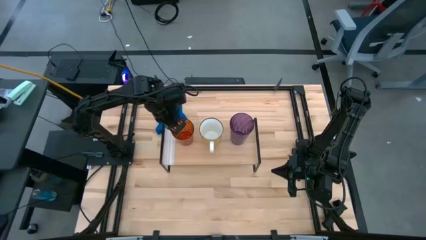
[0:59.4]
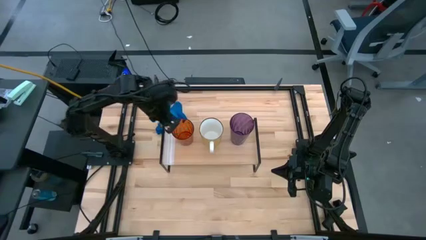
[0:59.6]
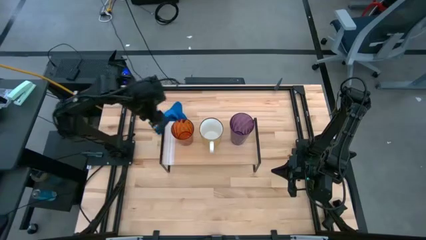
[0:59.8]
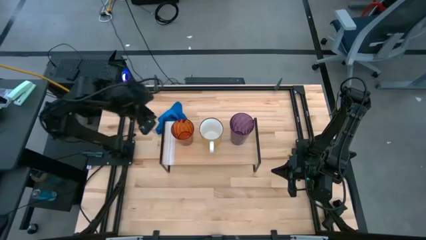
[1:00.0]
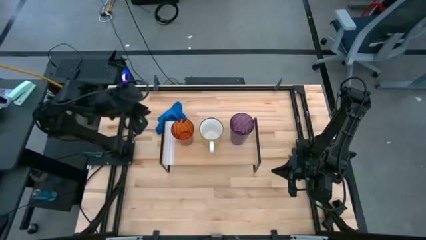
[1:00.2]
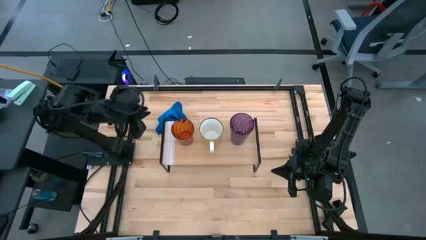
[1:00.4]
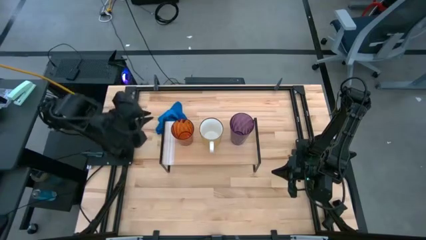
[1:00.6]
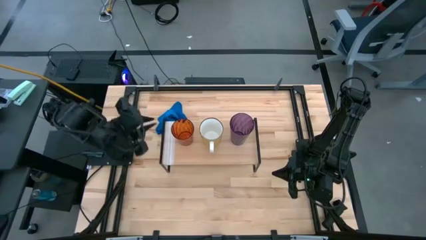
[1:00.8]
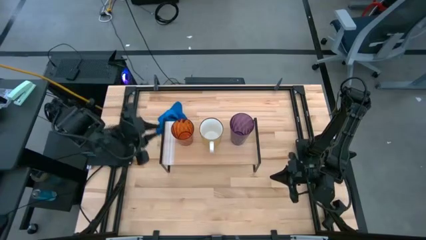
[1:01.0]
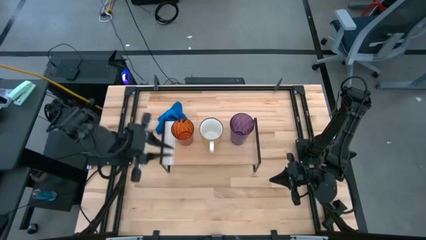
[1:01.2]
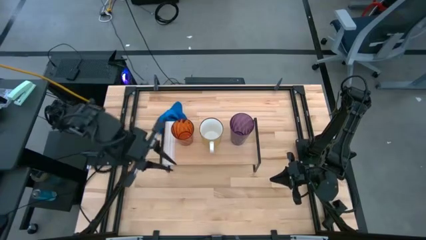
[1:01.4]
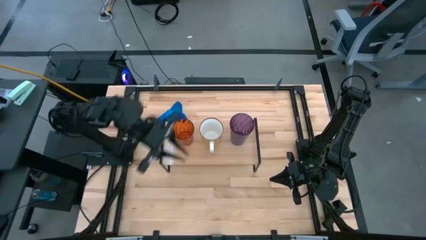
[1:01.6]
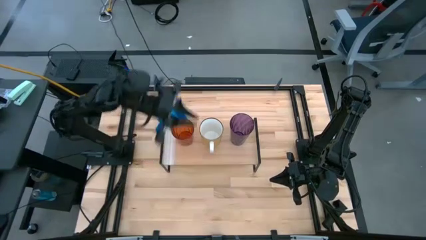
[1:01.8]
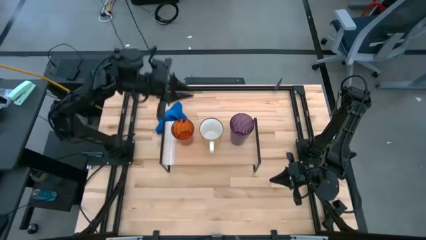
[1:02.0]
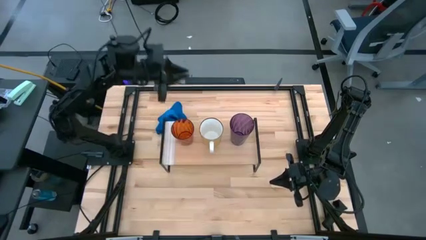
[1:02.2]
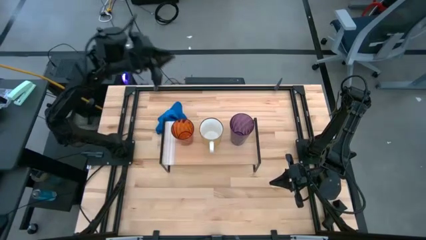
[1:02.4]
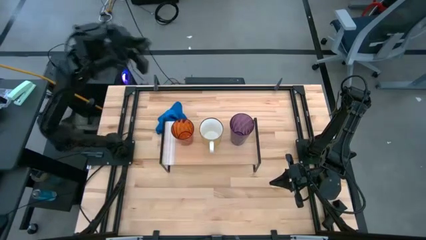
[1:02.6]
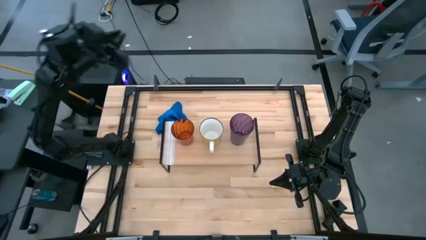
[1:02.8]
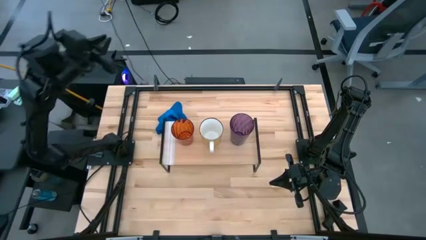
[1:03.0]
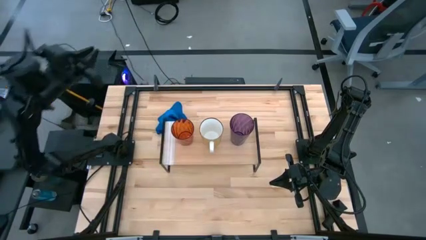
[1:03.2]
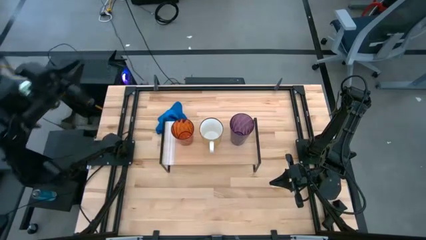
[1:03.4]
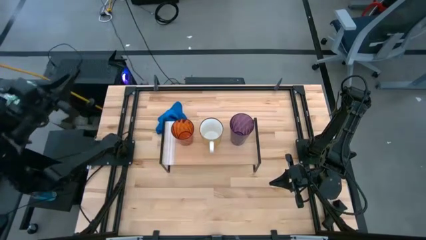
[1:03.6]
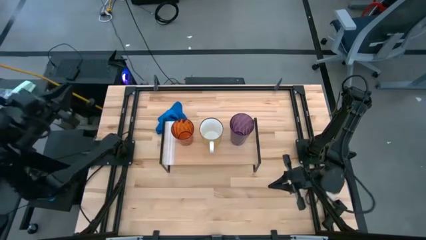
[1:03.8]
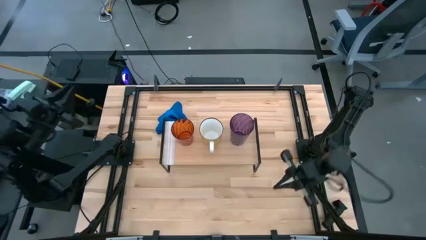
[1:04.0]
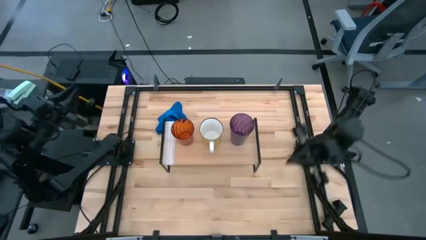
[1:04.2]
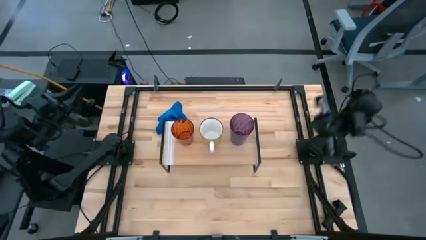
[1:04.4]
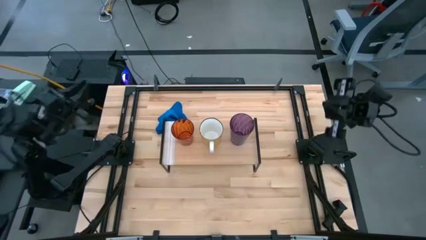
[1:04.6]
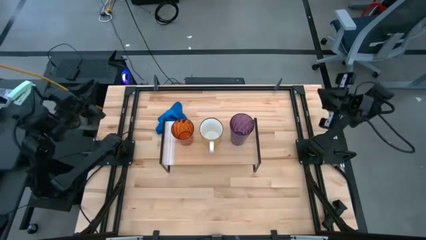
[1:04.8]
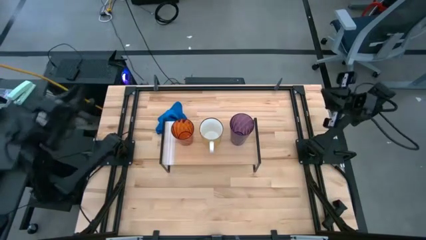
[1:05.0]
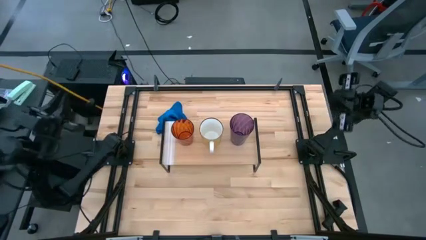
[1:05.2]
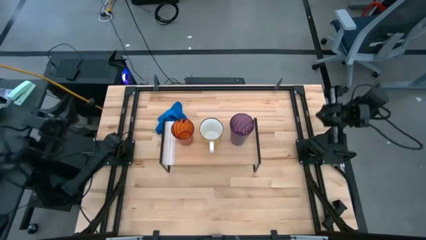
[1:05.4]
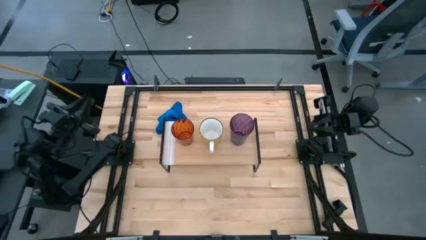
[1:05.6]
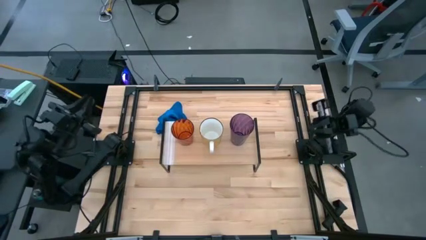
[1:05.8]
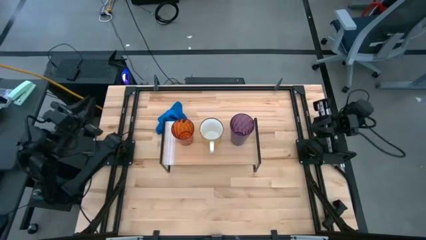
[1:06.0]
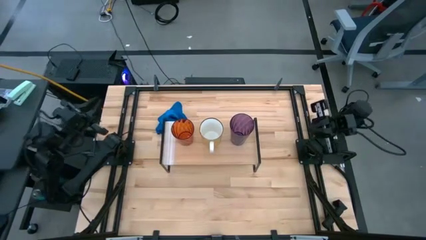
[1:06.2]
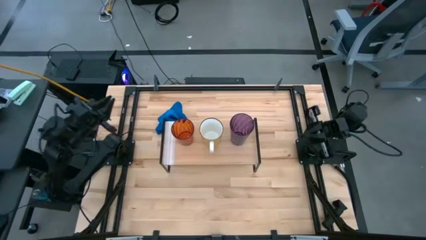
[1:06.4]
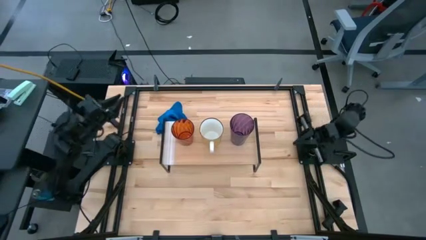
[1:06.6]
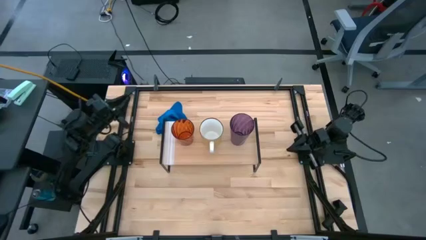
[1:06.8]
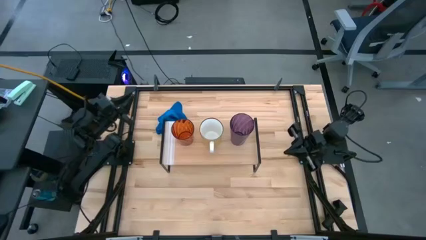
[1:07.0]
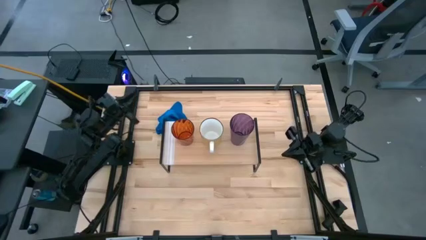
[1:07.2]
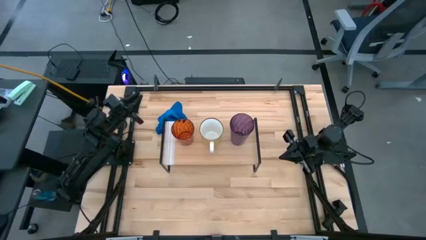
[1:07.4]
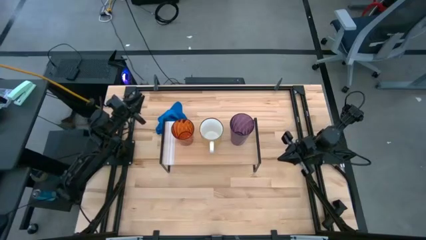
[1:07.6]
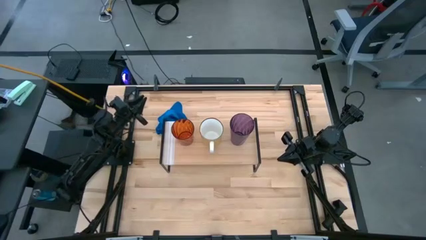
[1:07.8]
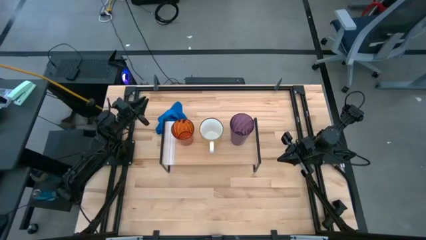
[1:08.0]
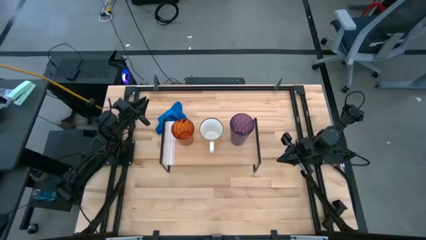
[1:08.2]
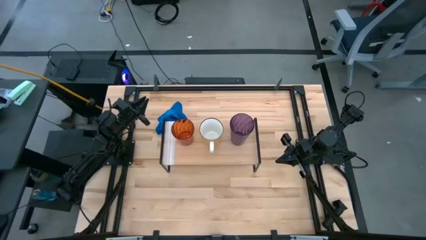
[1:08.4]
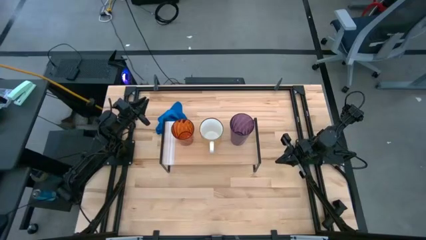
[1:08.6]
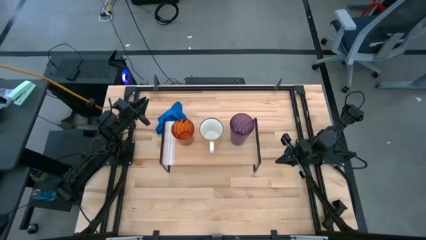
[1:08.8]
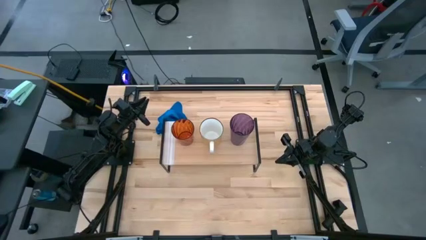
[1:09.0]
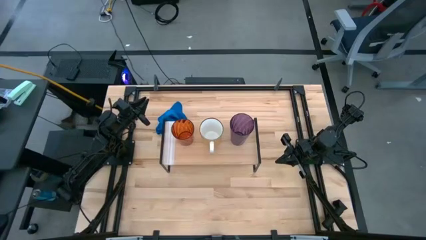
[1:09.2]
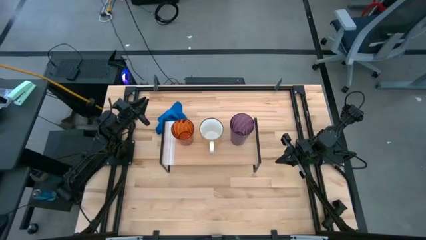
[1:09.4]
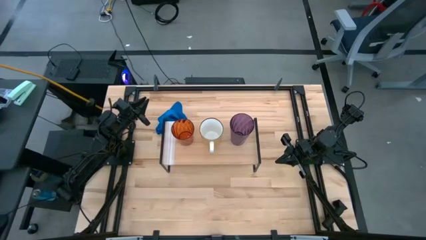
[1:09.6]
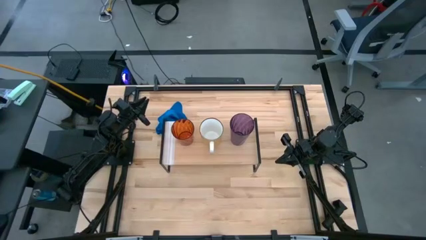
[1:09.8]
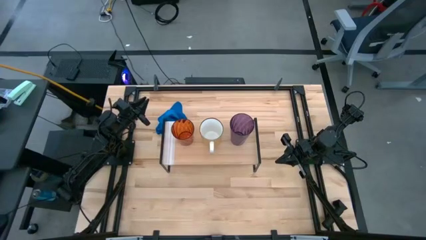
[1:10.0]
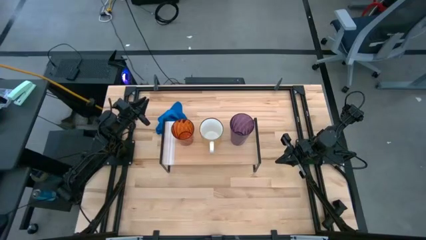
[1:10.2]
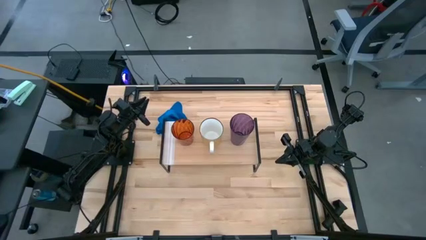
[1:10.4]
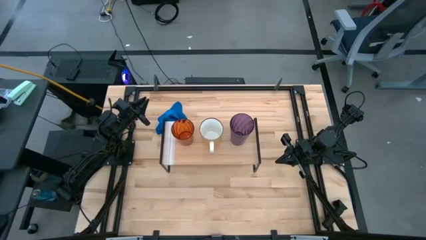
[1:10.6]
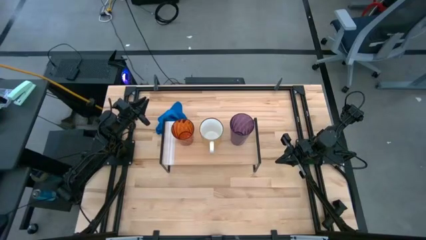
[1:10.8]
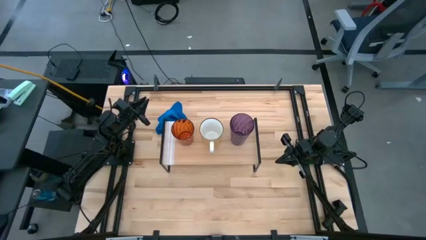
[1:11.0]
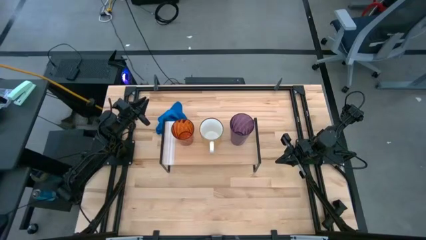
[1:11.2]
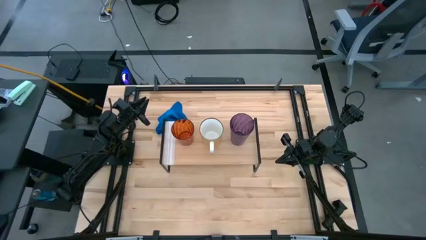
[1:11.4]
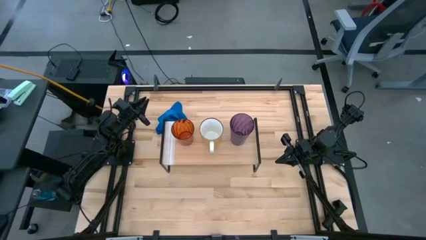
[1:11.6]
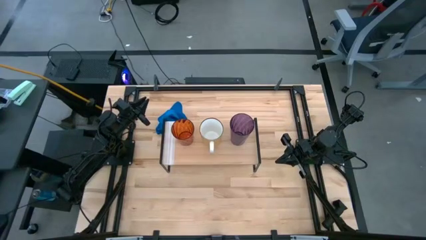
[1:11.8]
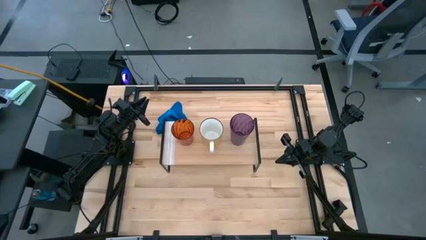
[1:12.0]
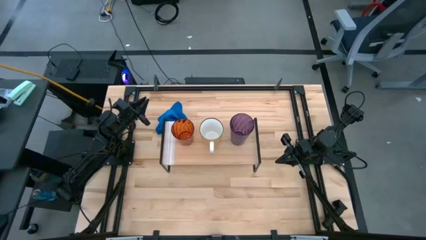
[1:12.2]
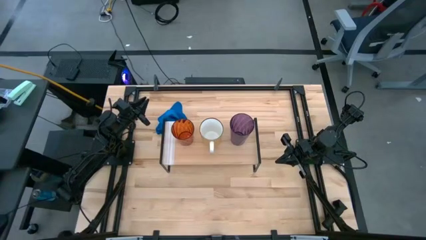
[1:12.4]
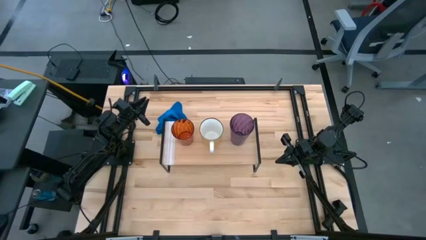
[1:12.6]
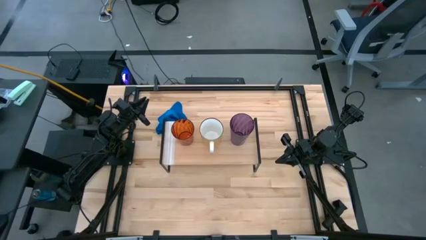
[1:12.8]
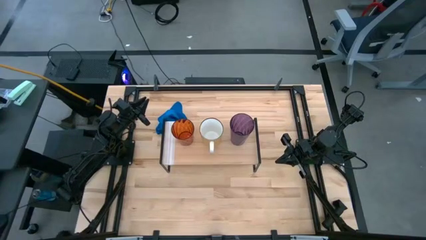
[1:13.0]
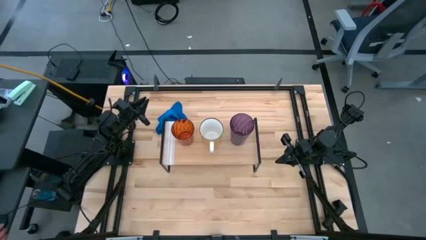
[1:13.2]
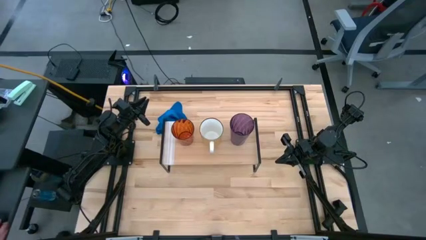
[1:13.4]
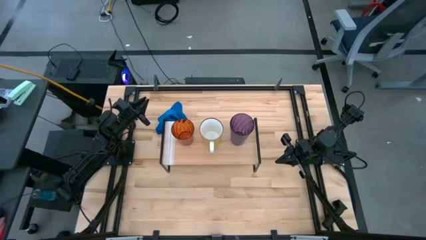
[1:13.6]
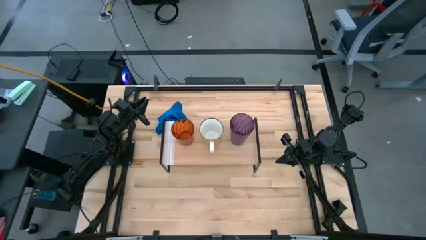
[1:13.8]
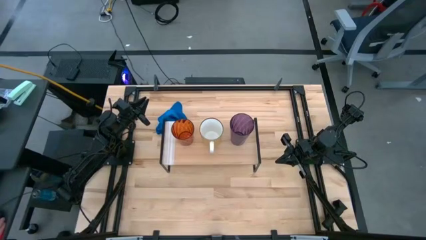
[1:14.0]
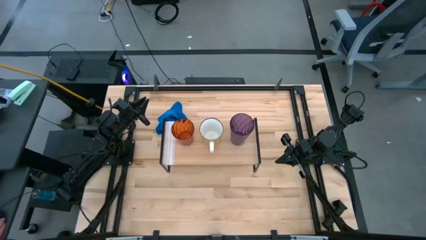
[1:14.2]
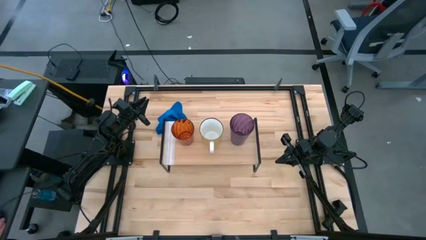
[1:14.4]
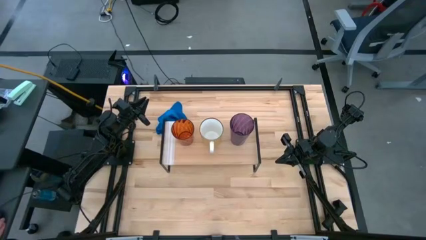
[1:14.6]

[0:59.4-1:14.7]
Task: Stack small to large cups/mugs on shelf
Return to Home Position
